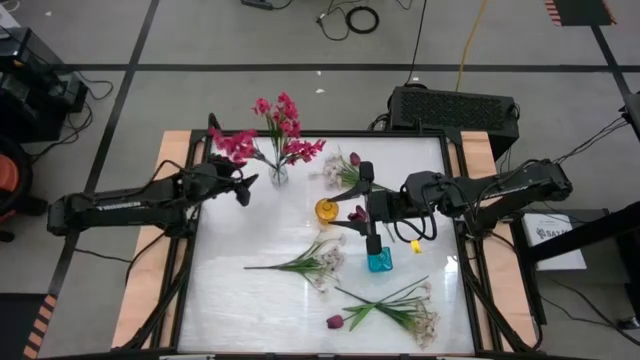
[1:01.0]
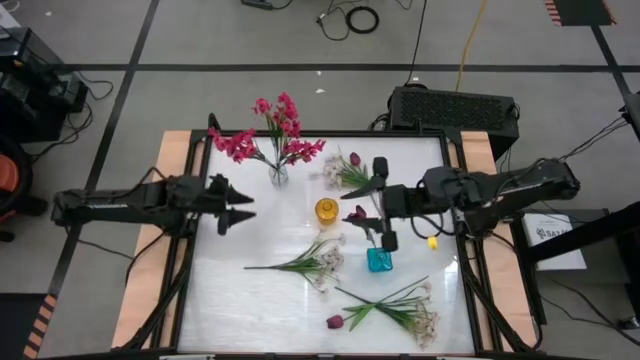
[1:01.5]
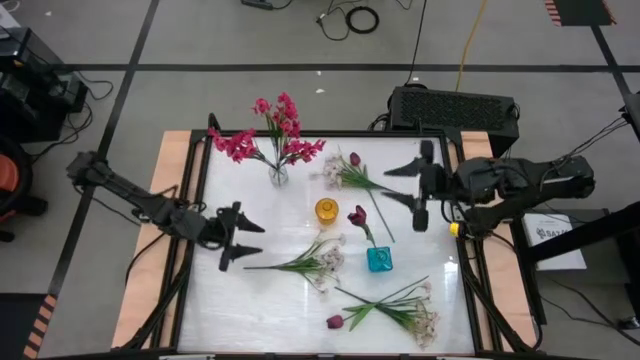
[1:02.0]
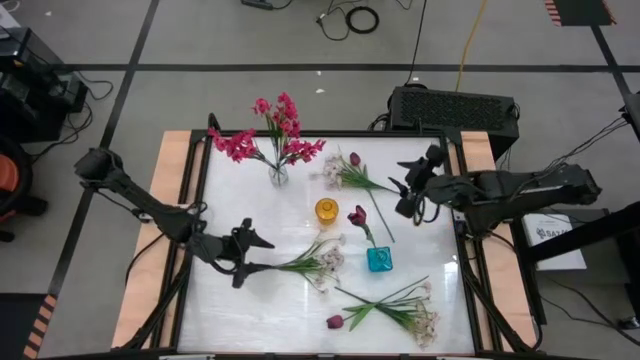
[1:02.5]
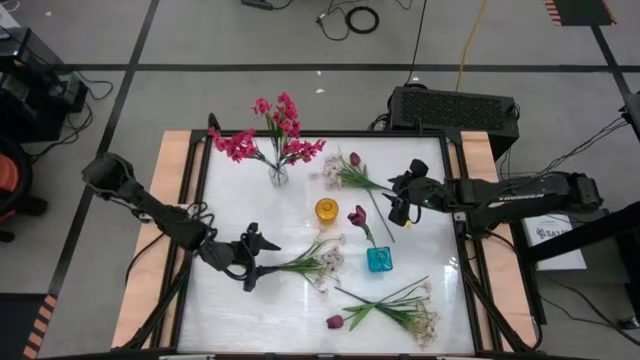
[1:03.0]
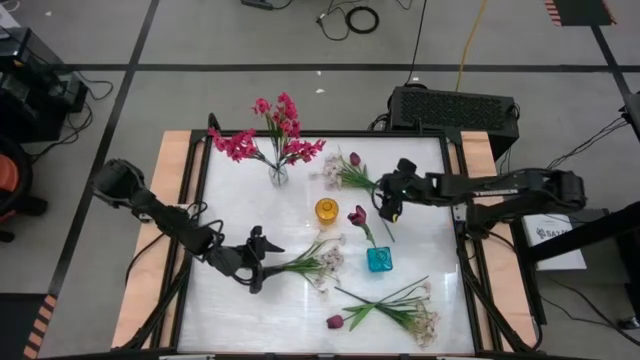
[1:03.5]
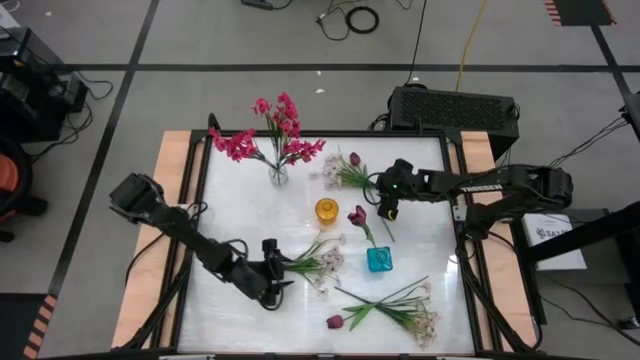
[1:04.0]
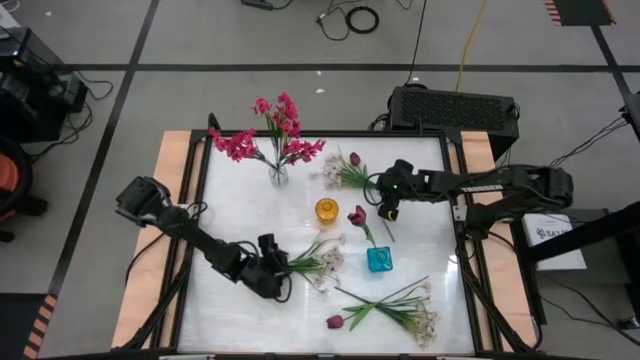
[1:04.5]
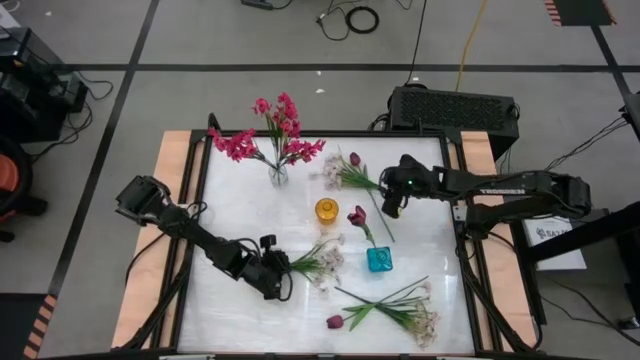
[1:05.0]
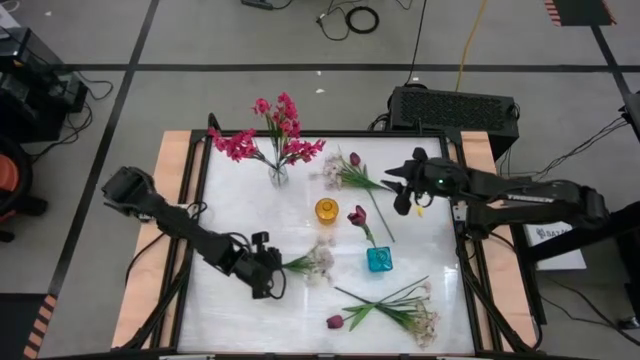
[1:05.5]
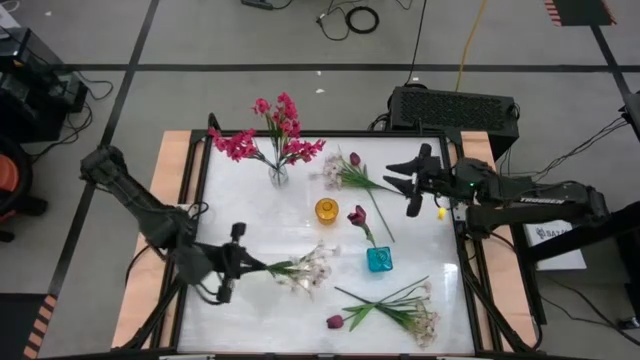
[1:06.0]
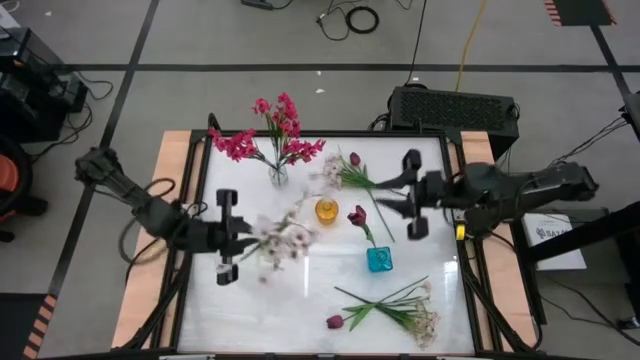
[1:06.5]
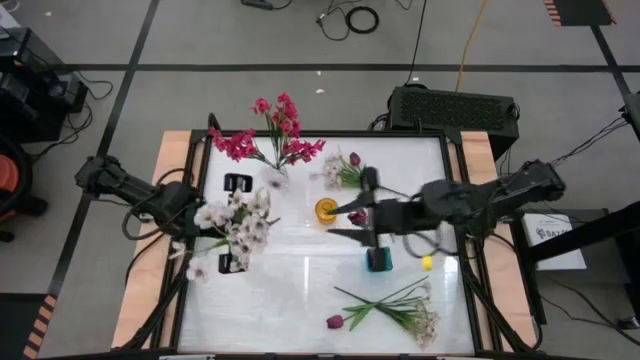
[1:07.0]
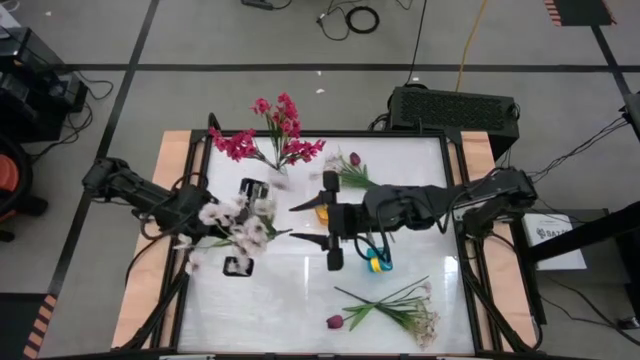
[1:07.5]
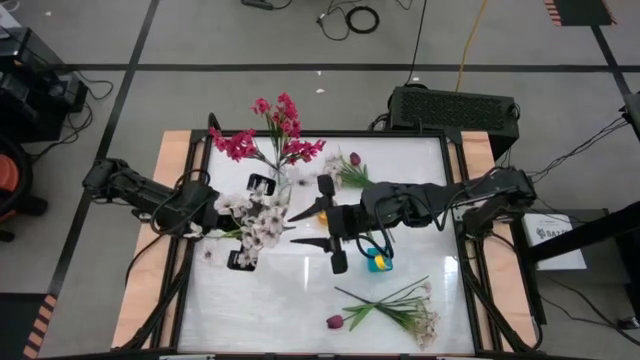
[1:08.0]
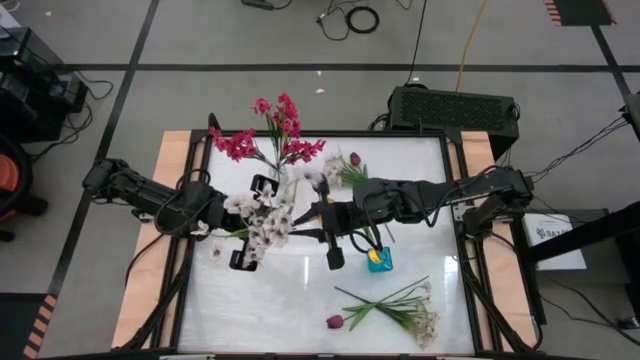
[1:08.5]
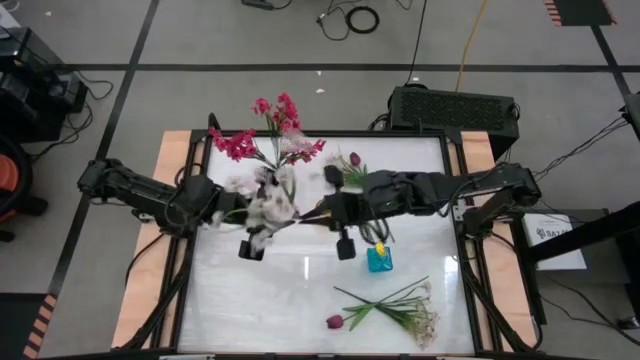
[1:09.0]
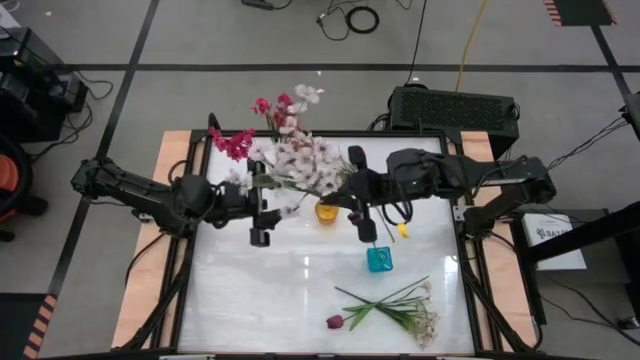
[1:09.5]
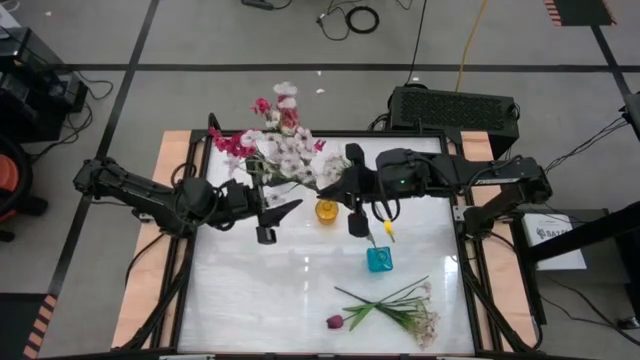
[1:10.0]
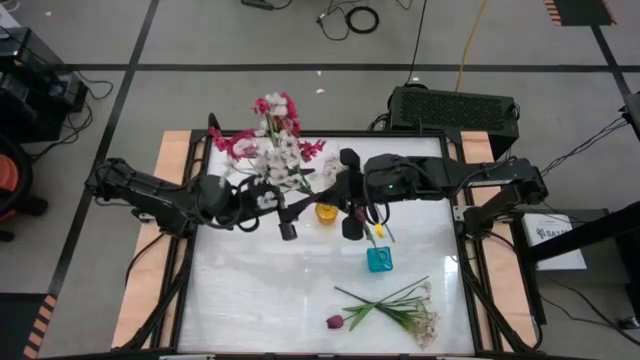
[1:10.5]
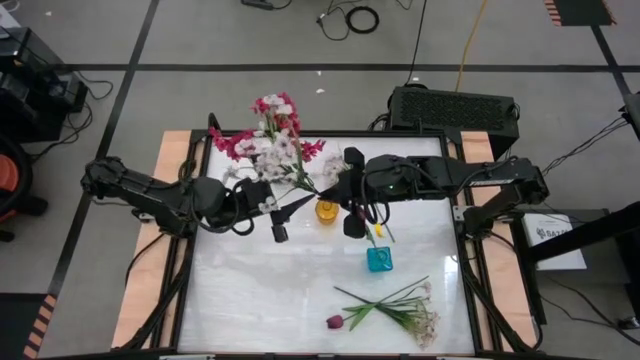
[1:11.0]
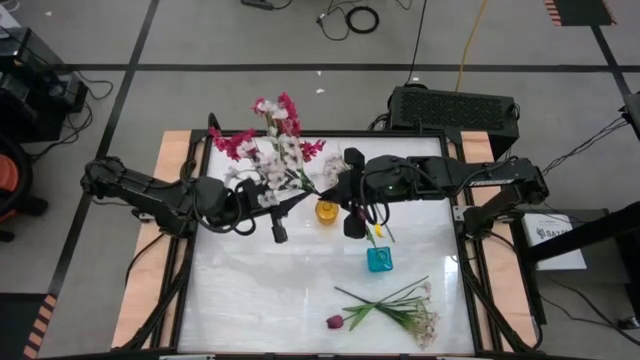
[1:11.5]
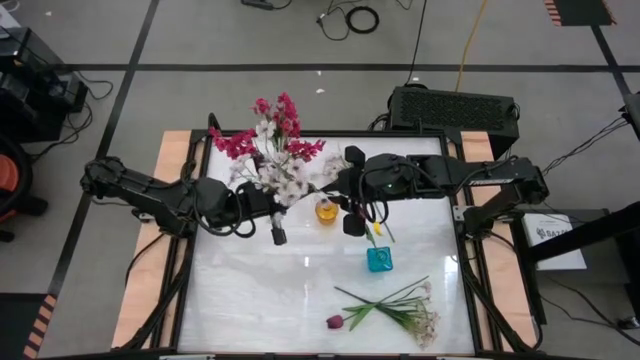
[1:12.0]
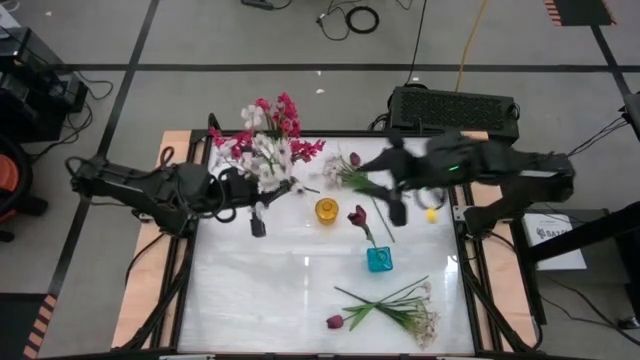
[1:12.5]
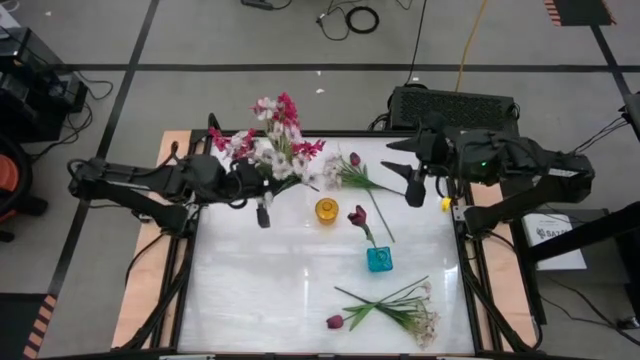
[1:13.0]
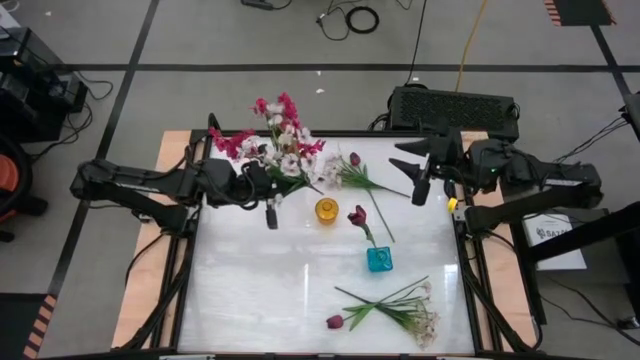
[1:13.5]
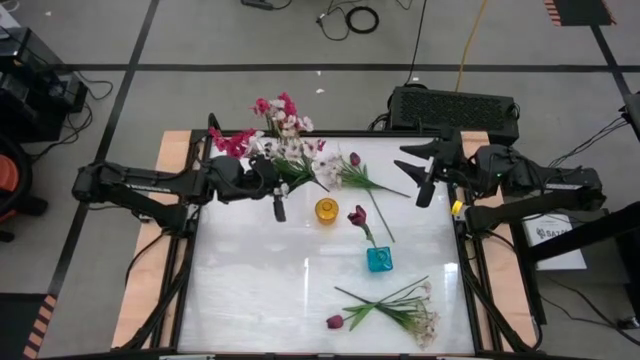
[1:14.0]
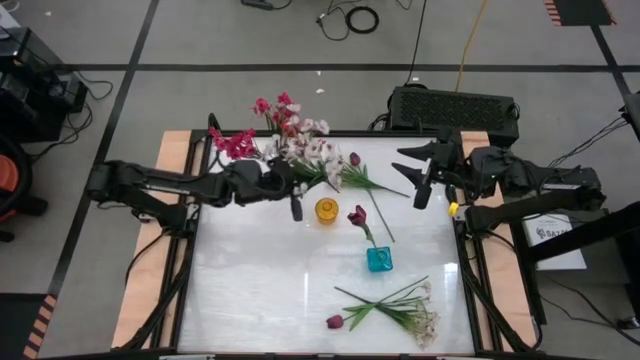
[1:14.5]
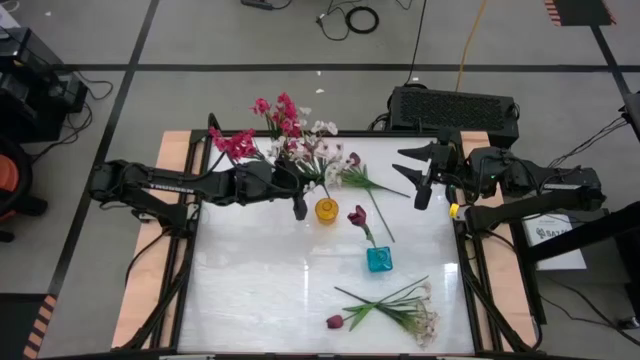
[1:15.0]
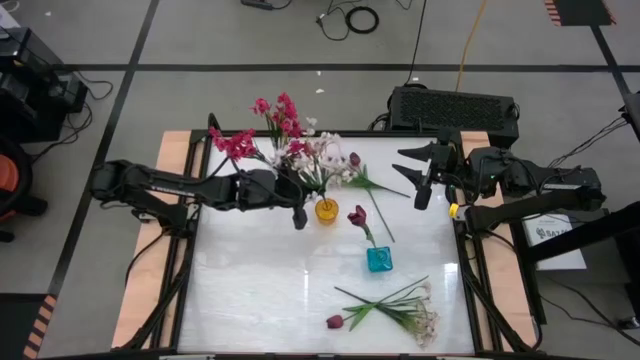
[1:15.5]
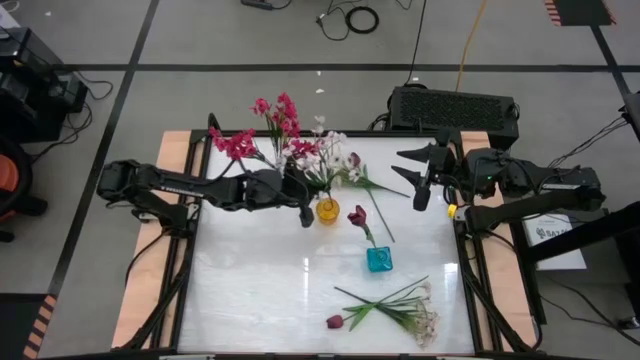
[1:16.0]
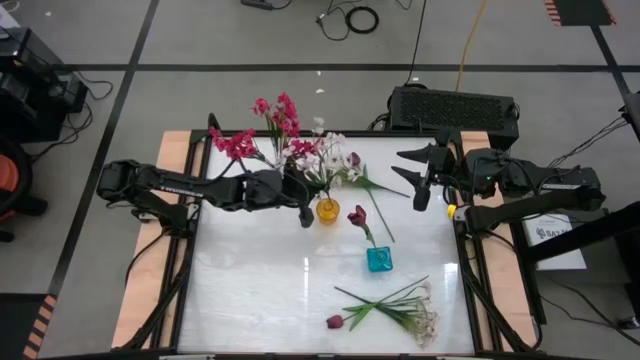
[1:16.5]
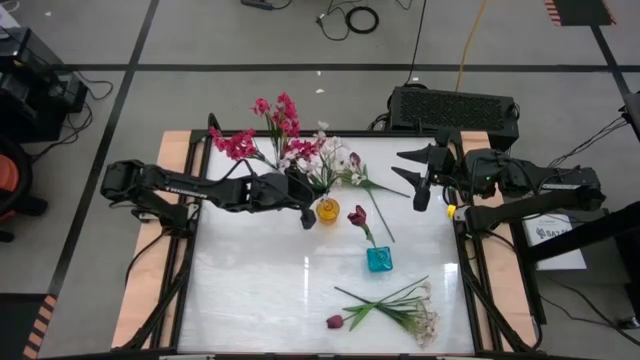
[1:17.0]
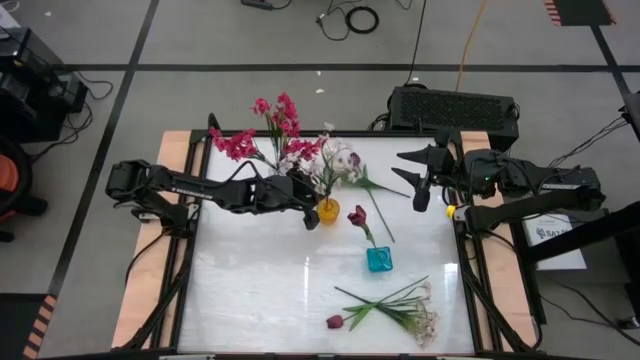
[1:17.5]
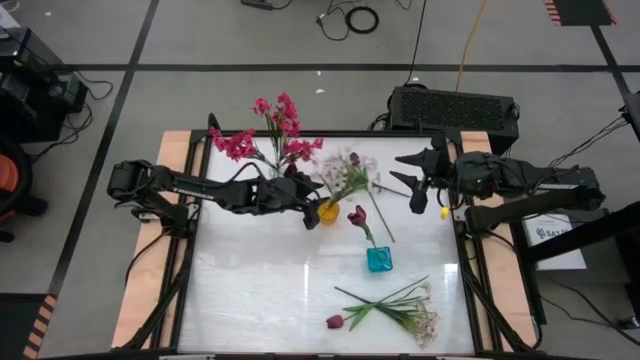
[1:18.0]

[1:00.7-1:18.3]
Task: Sort flowers into vase by color
Put the middle white flower into the yellow vase

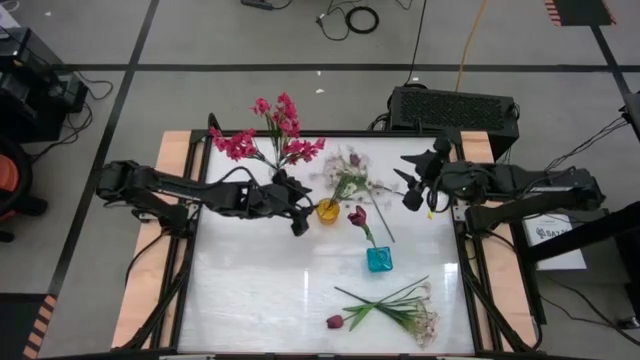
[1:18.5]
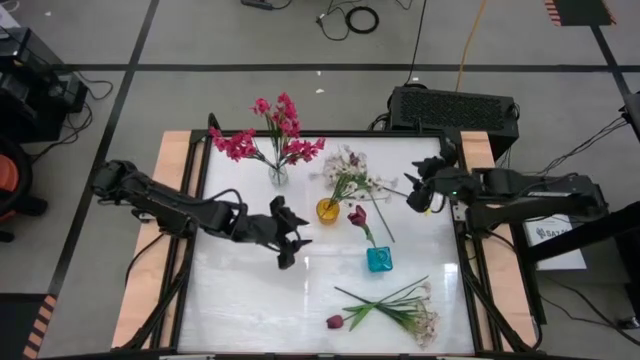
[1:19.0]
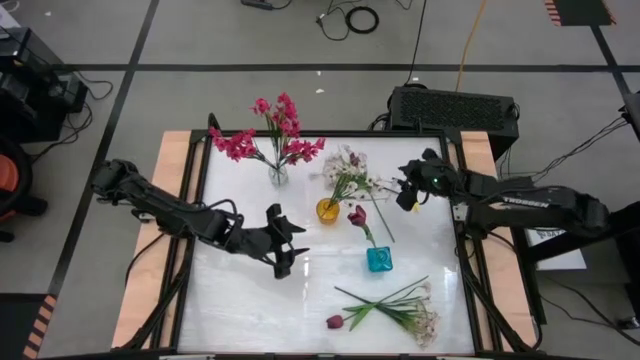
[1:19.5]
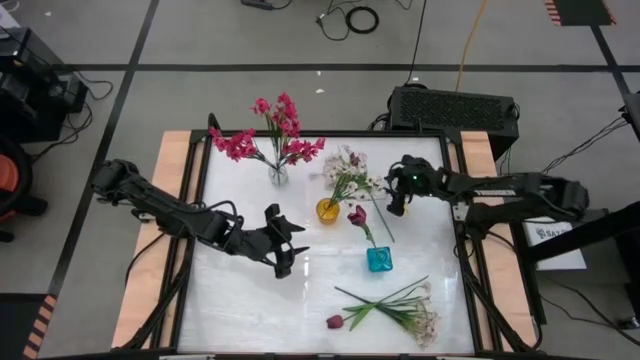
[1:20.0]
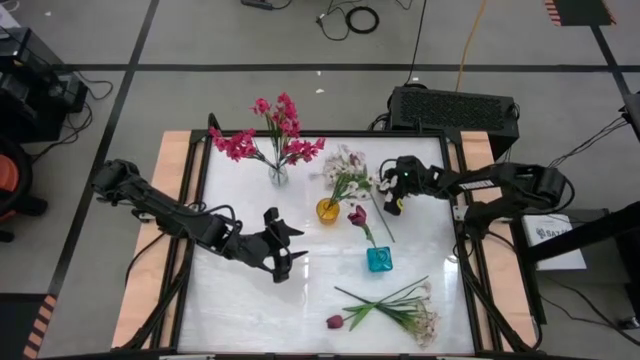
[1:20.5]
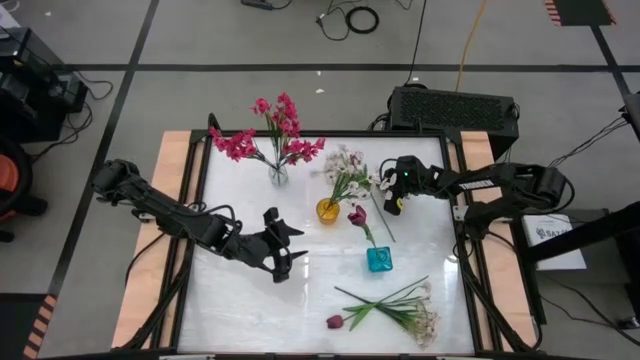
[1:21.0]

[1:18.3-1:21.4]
Put the top white flower into the yellow vase

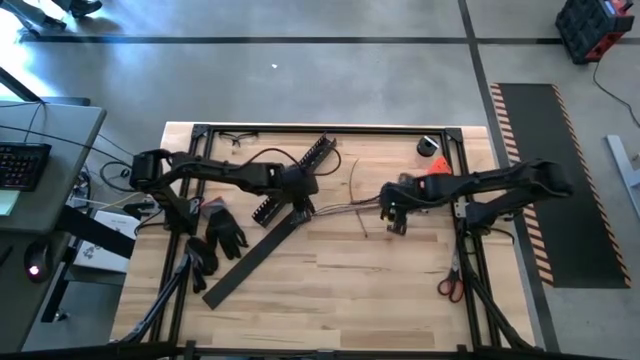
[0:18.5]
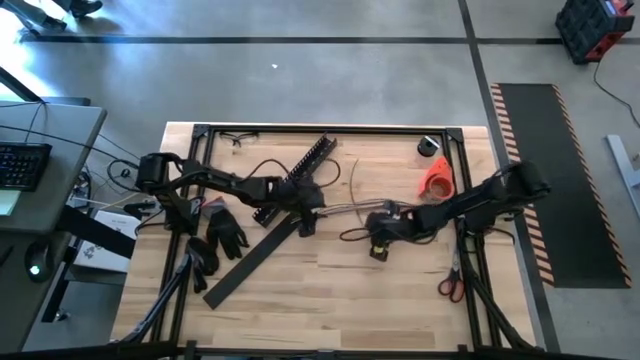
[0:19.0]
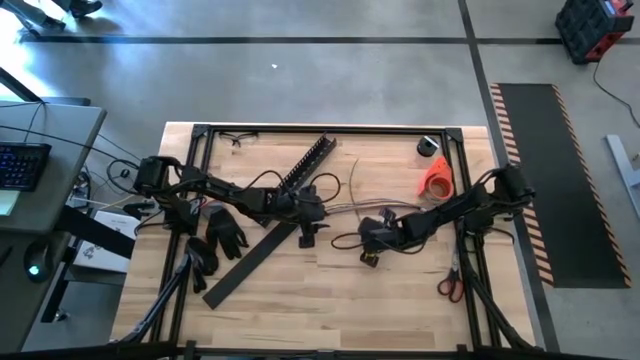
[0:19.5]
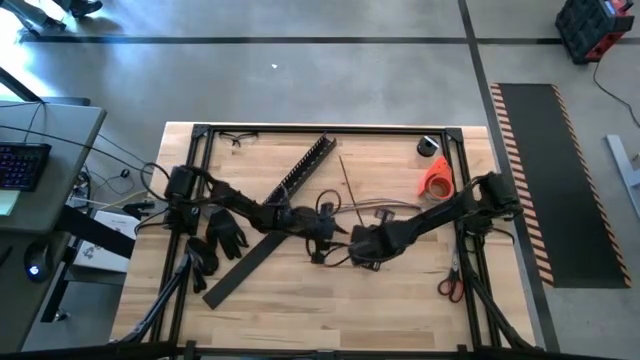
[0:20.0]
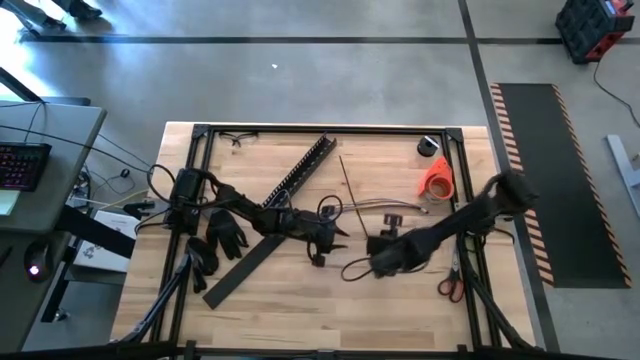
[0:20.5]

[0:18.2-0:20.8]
Task: Ziptie cables
Wrap the cables together using the black zip tie
